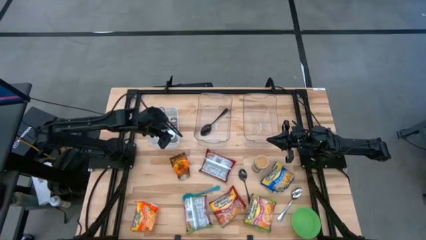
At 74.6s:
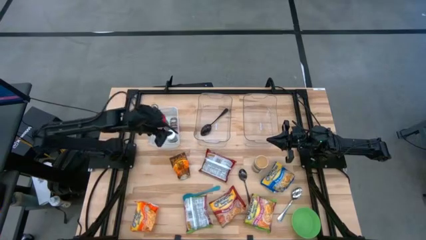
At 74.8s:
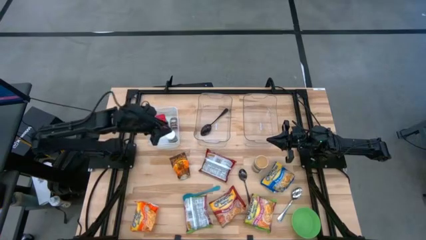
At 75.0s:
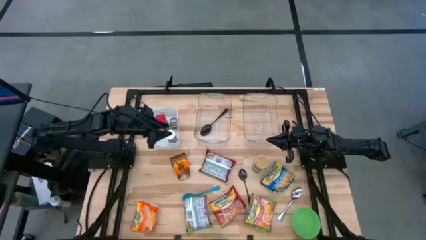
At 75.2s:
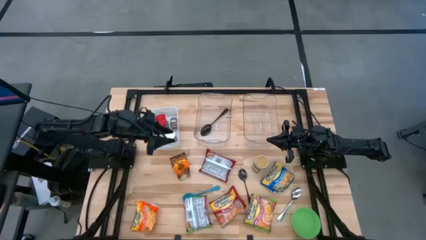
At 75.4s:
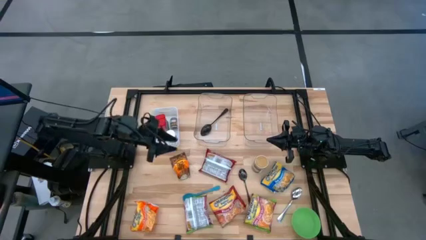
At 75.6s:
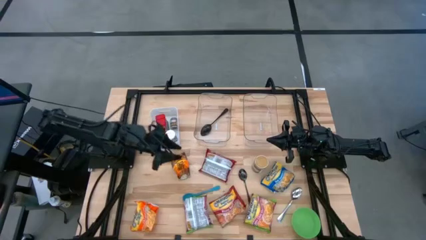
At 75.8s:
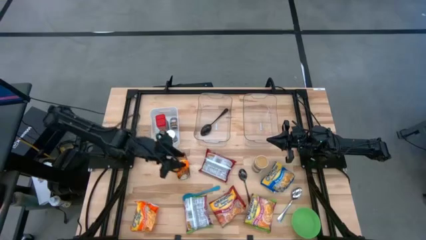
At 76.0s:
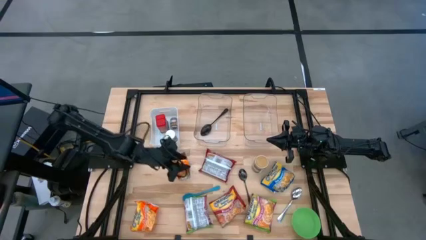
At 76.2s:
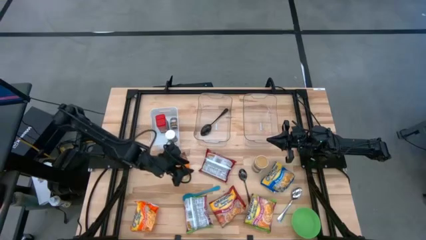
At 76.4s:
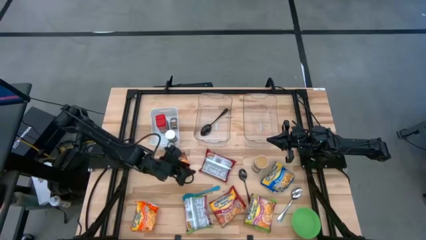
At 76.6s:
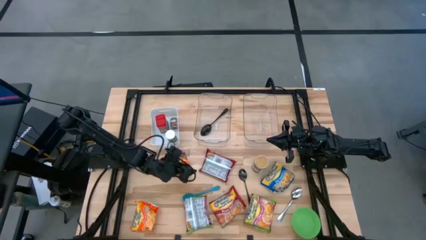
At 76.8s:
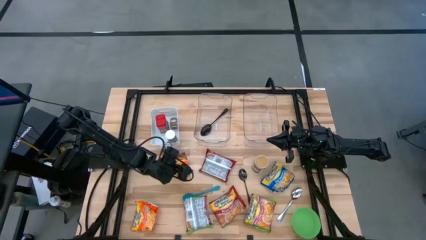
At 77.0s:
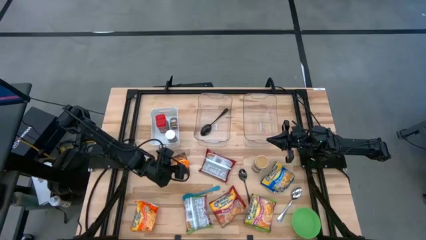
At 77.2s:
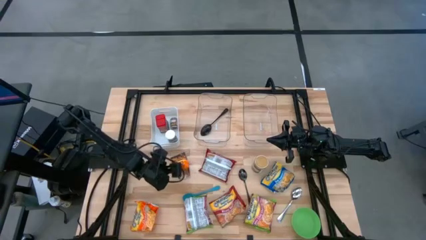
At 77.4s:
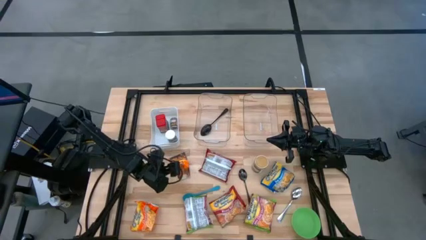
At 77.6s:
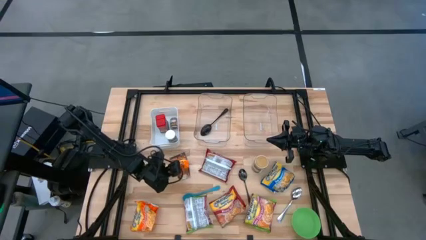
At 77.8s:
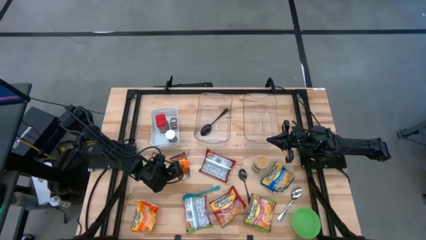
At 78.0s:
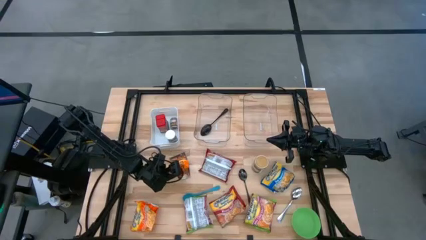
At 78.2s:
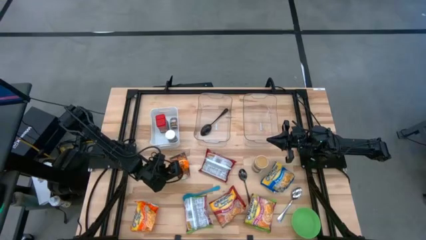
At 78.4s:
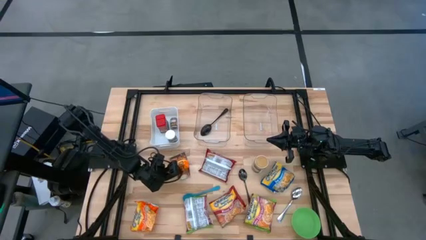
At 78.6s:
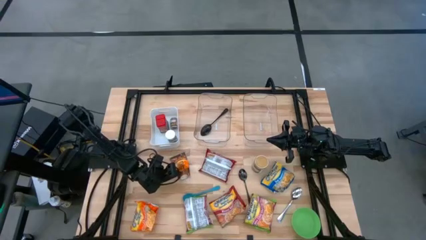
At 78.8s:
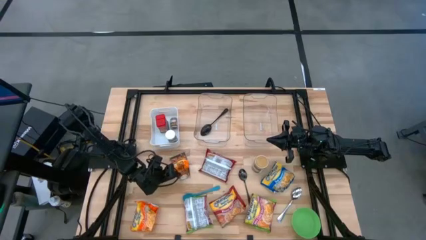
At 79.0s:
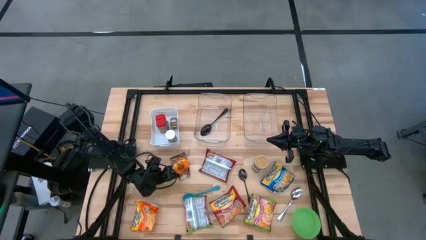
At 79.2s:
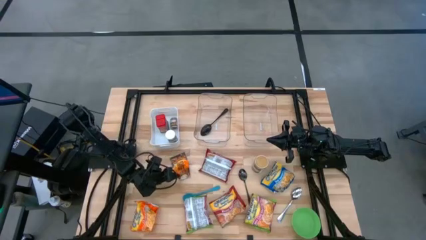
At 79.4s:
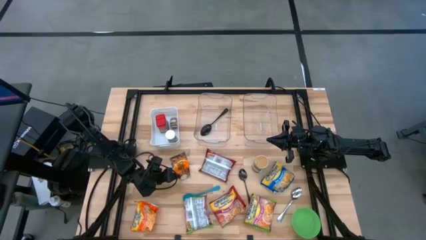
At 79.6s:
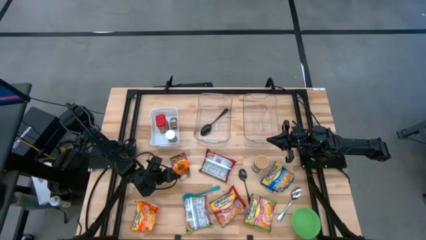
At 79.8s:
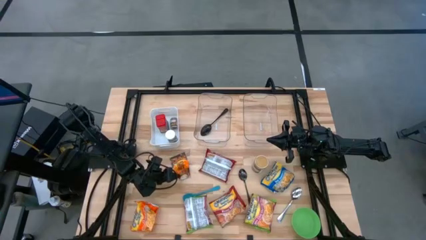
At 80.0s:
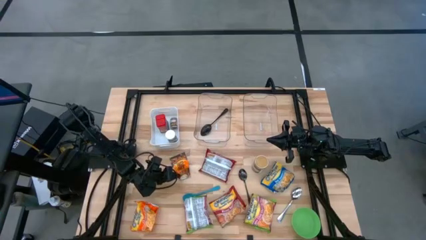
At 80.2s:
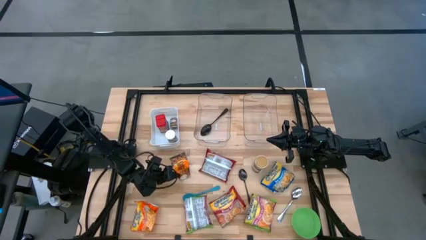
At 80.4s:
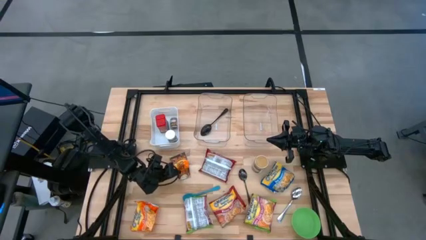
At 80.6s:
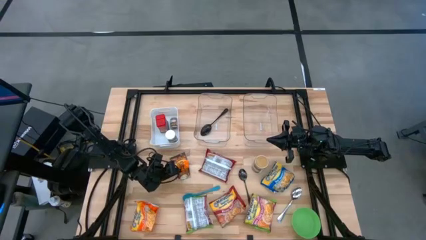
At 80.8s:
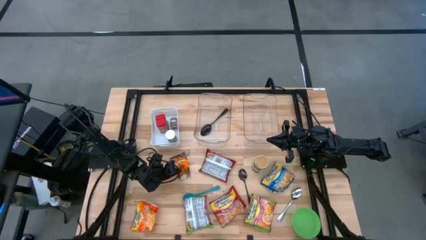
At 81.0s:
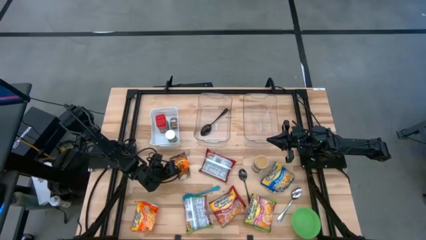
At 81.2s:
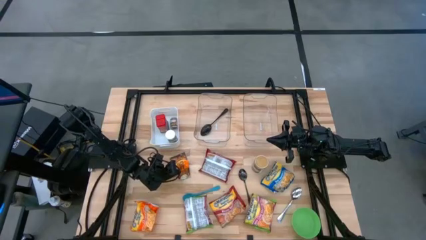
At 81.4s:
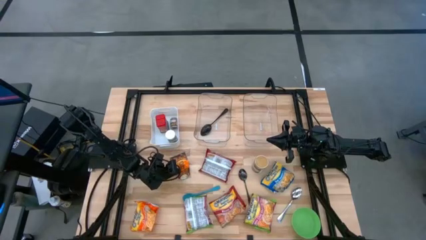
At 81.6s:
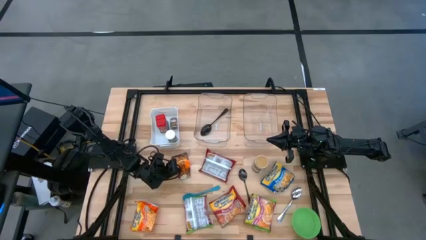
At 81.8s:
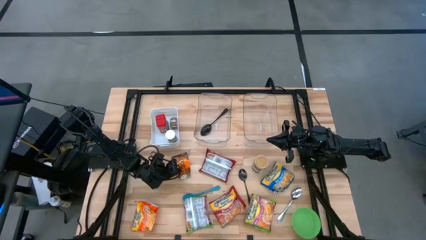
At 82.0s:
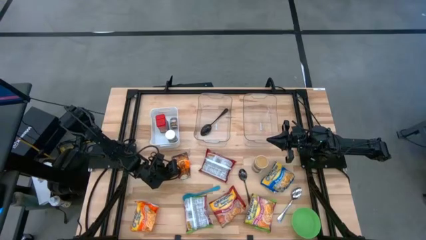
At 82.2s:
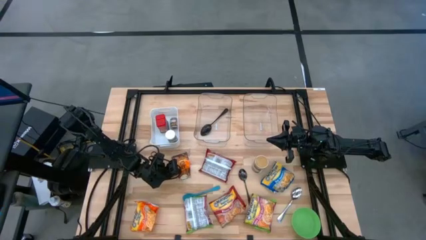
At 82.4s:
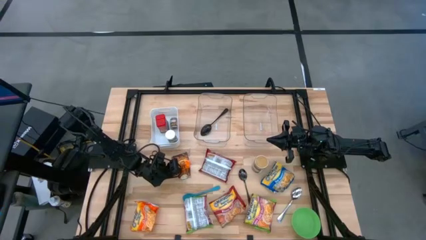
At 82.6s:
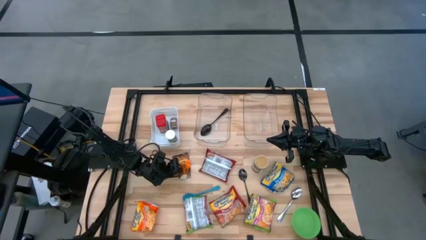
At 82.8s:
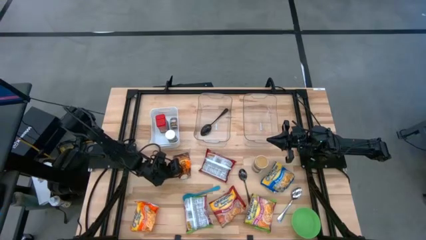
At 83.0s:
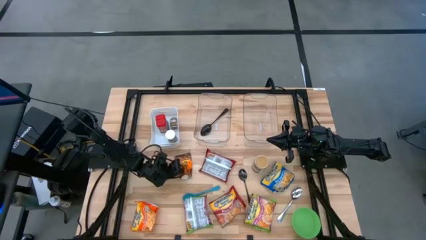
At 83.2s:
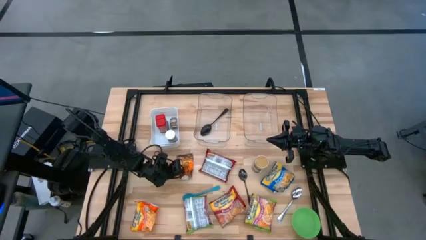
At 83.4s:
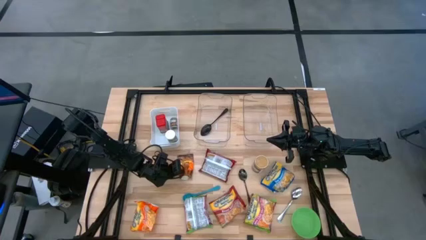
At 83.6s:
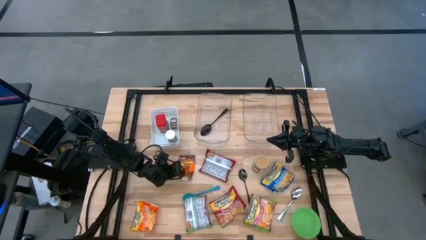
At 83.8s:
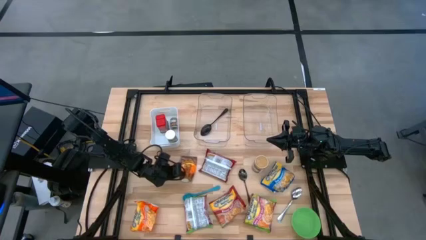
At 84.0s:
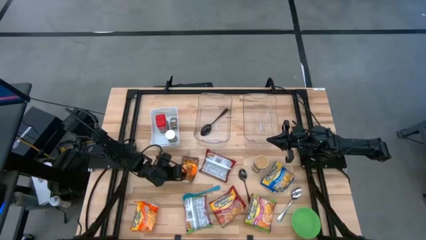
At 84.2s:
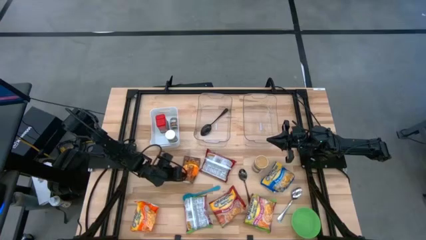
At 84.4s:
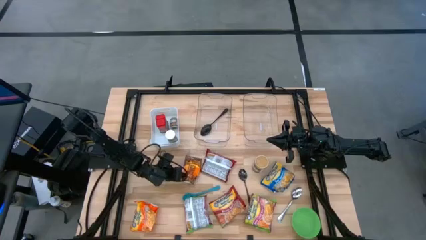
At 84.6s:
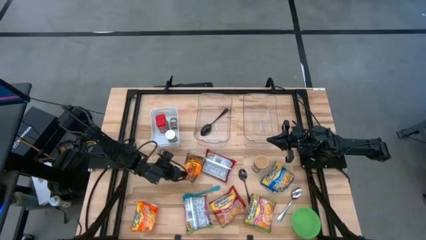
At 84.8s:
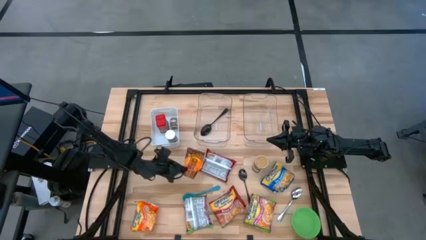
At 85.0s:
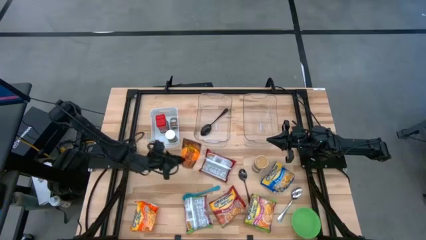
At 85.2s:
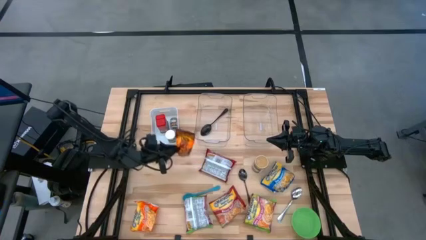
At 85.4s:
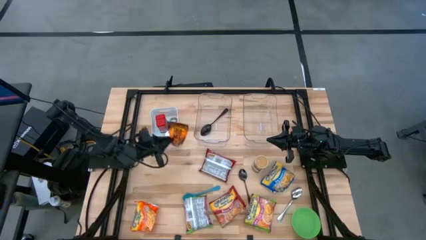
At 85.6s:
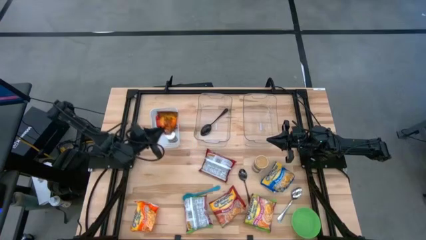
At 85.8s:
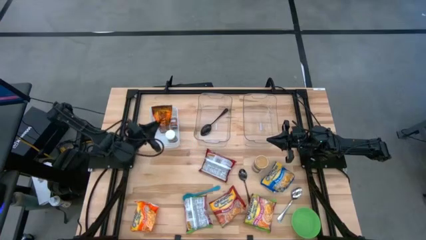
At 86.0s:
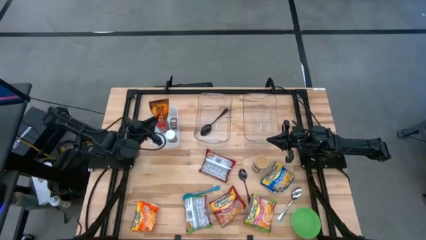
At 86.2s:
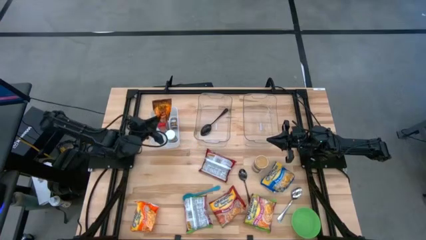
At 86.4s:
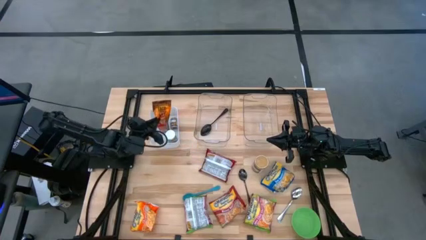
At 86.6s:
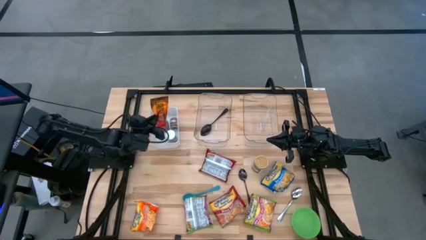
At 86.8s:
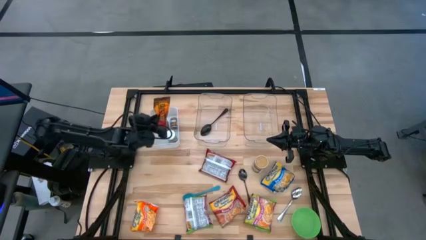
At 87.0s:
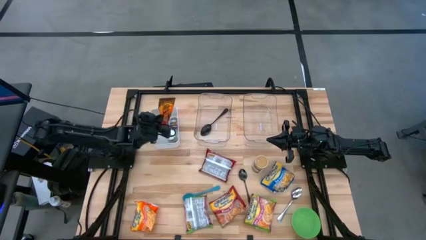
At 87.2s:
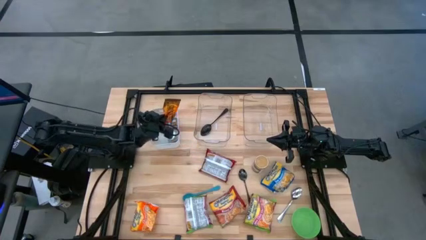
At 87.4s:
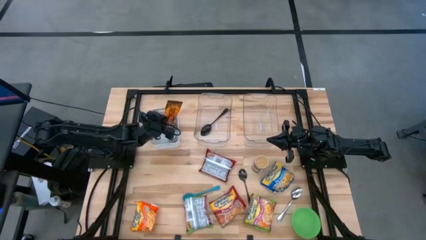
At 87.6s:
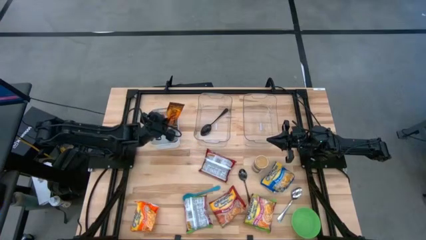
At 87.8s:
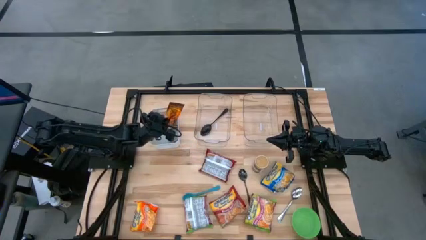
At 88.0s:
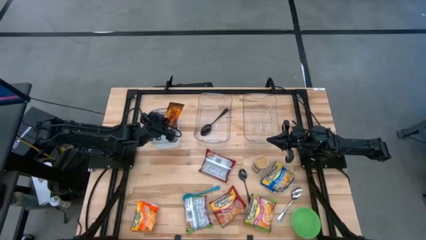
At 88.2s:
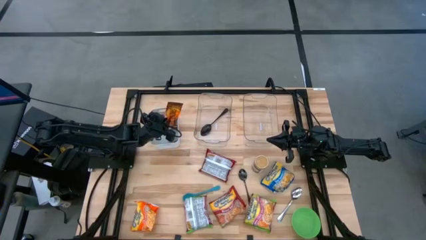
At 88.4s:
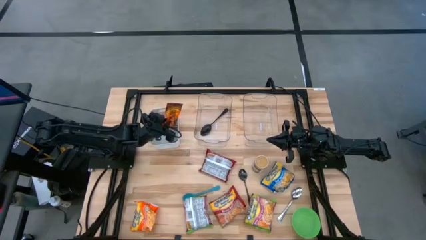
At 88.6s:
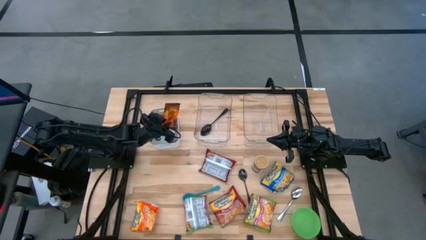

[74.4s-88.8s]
Task: Pick & Place Food Item
Put the orange seasoning pack into the white bin
